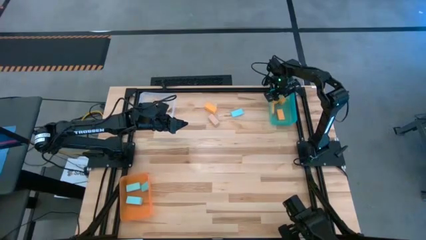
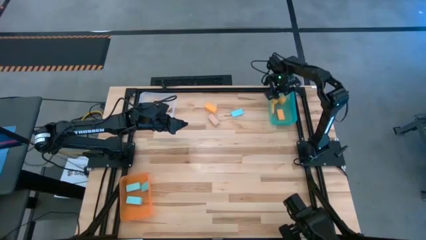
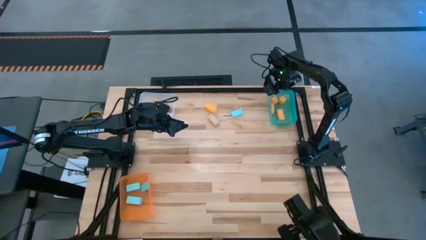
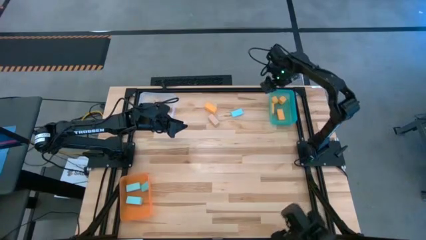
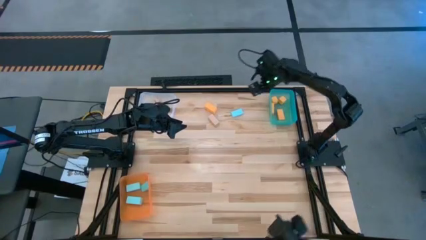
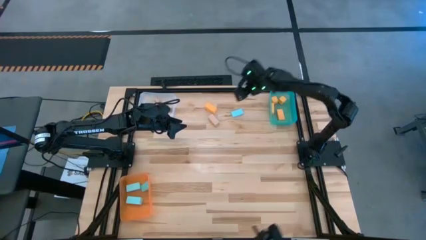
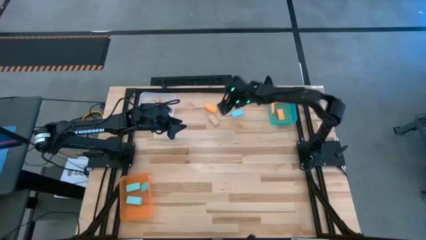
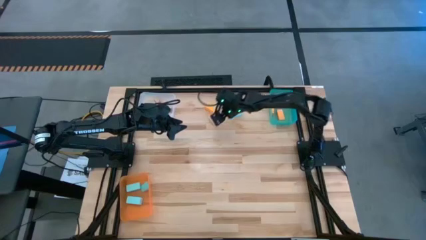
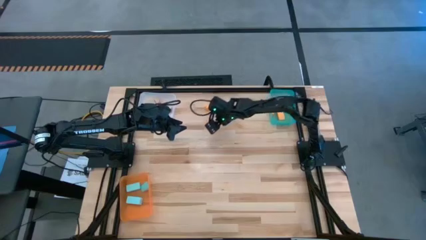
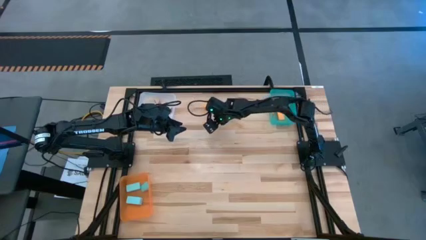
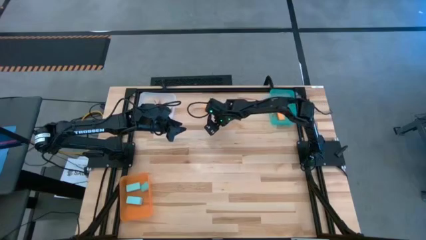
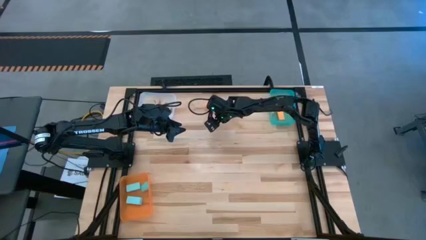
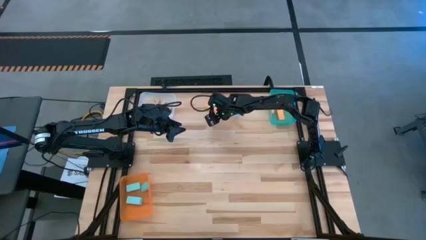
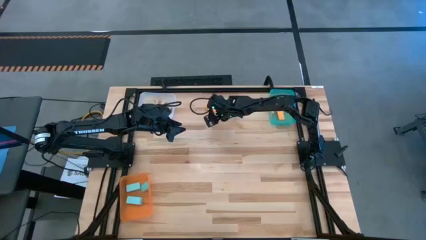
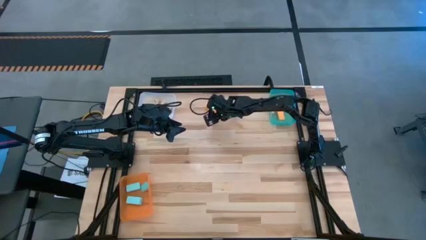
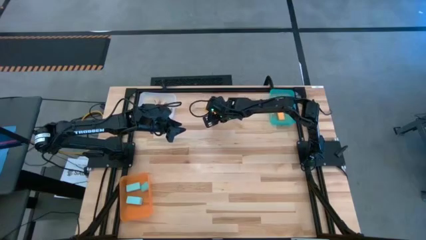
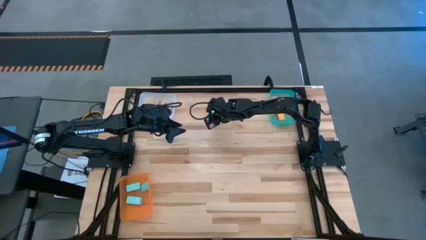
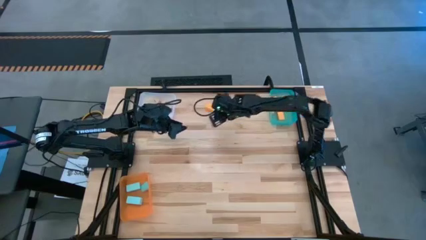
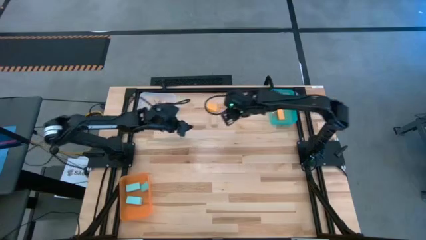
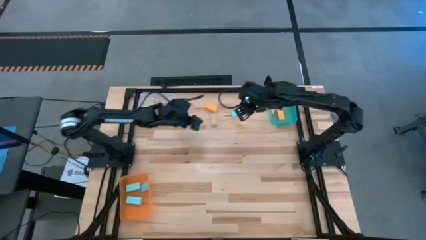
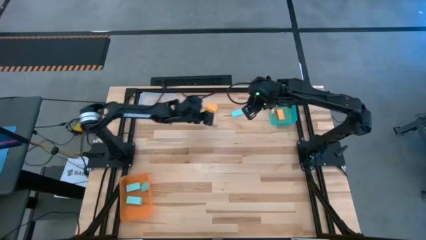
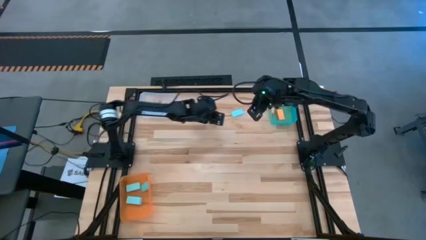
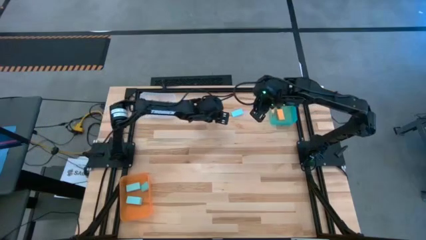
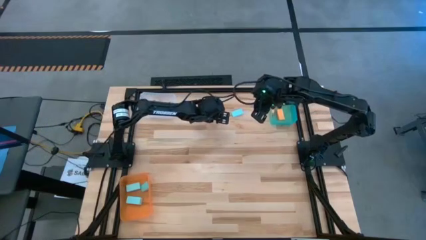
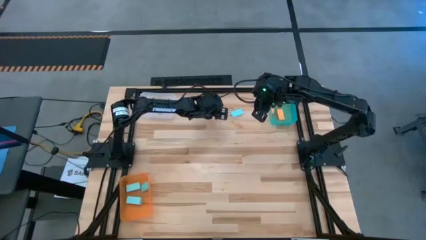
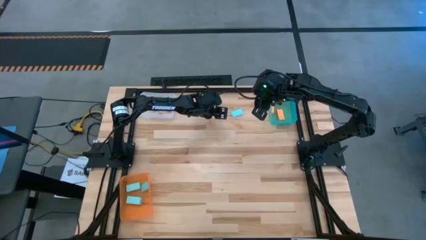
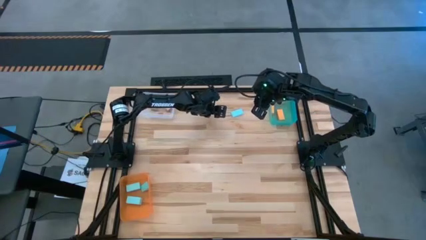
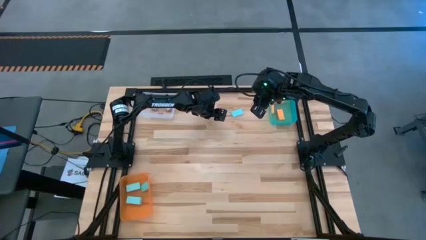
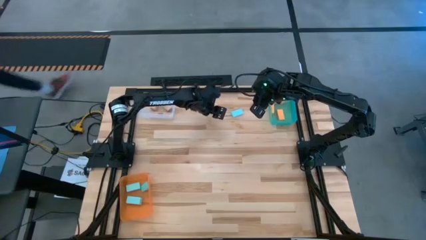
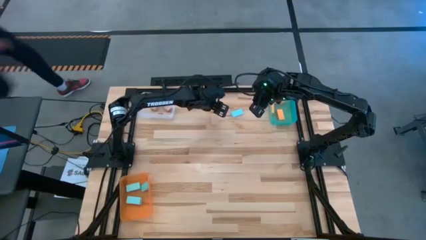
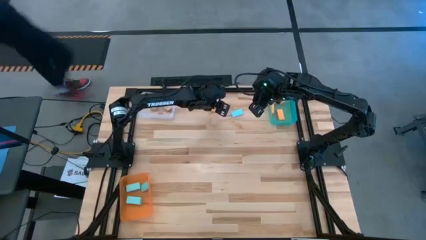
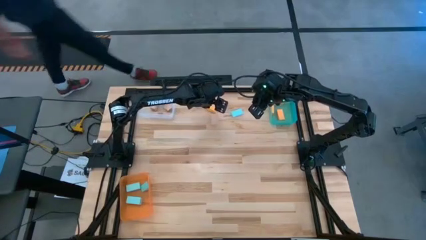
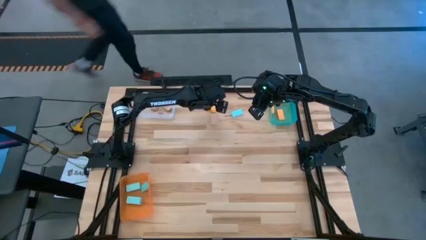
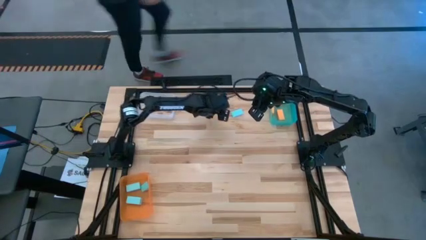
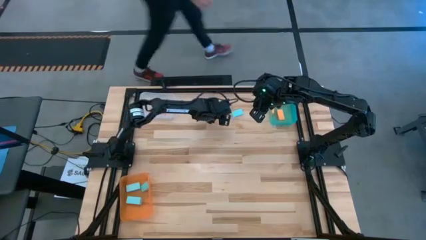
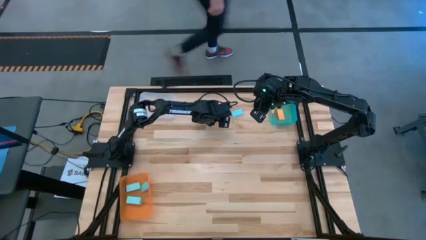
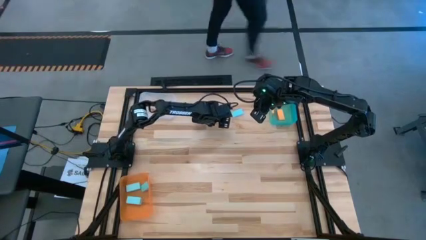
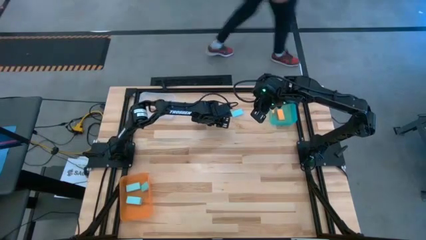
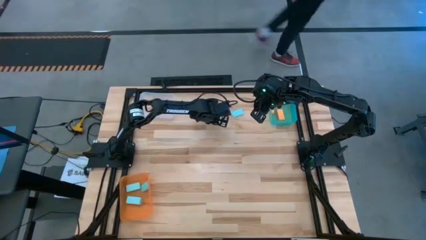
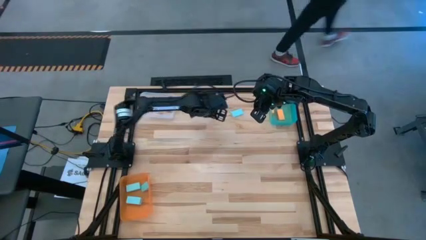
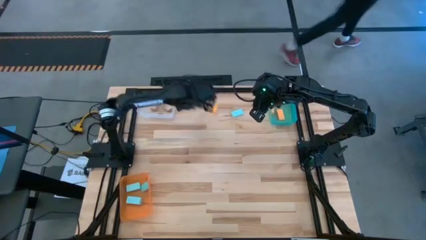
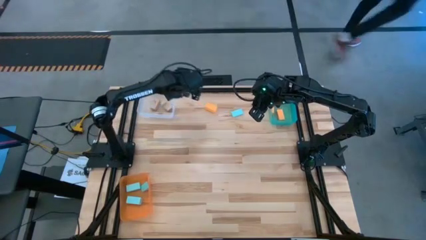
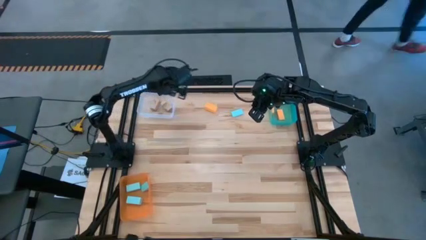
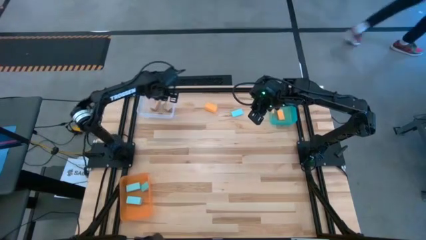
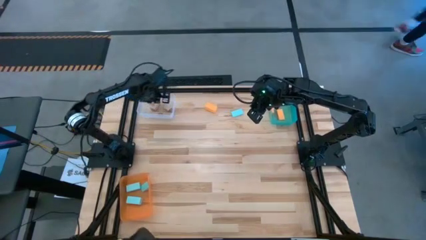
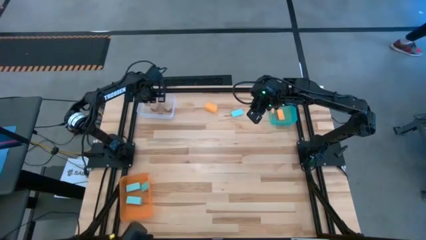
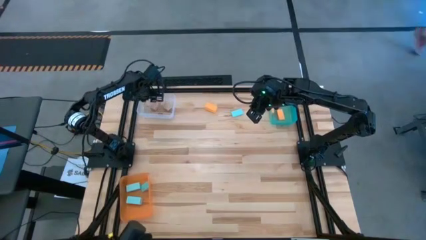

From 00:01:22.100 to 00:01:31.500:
Task: Sort & place blocks by color
Put the brown block into the transparent bin

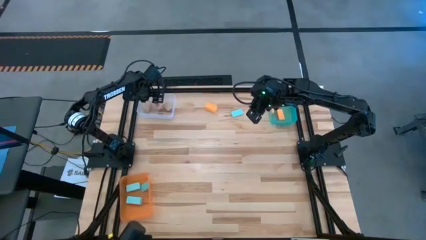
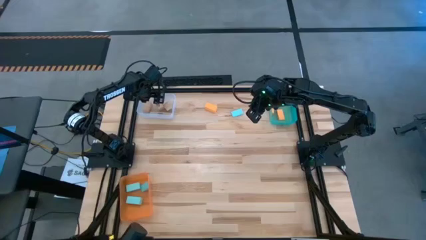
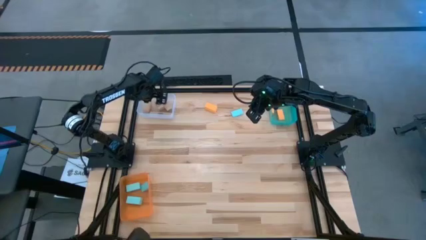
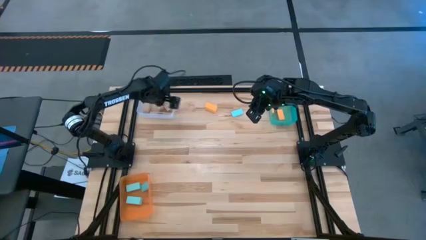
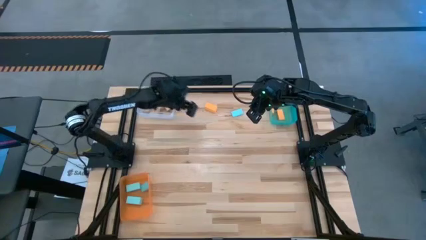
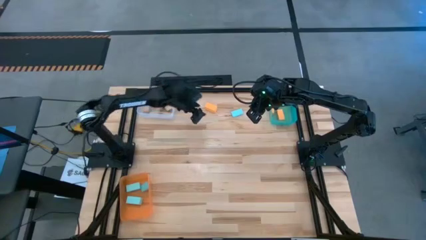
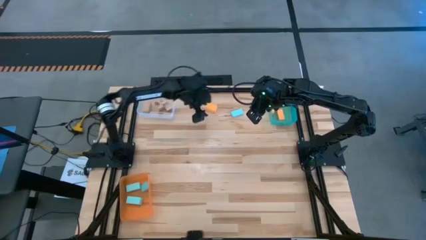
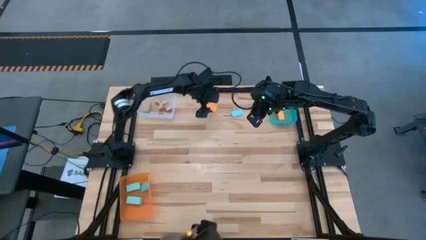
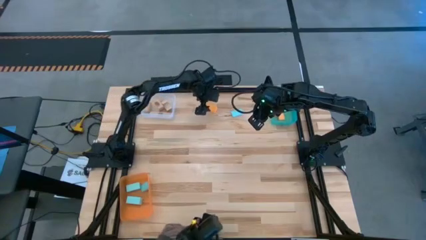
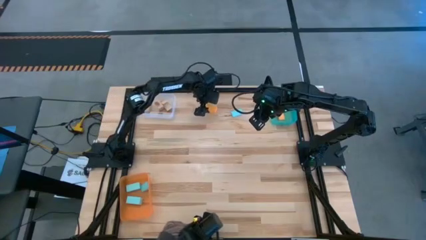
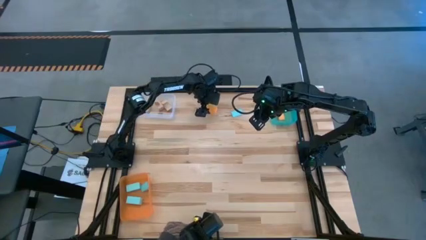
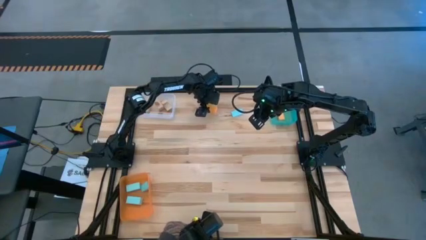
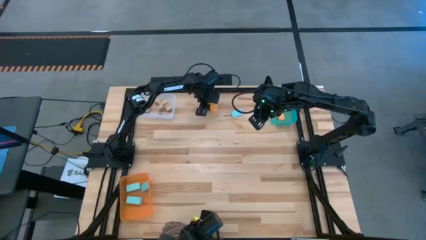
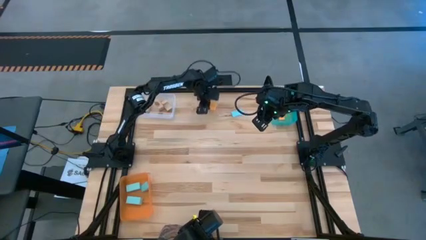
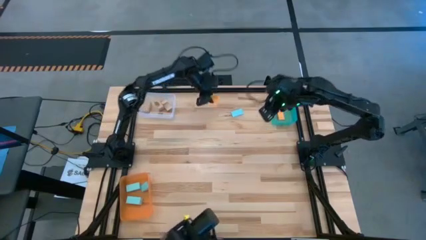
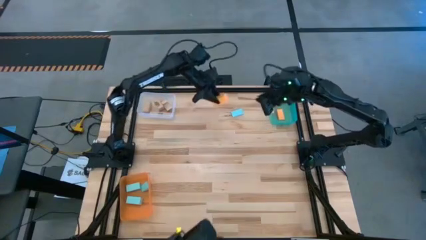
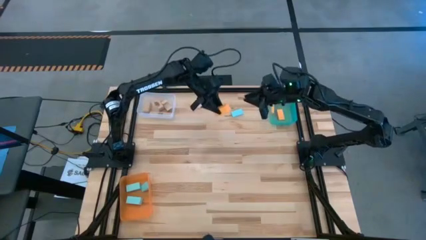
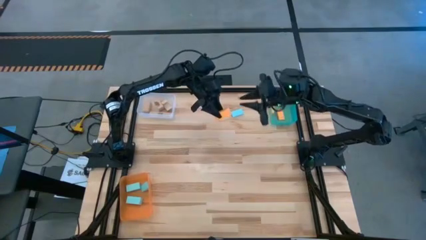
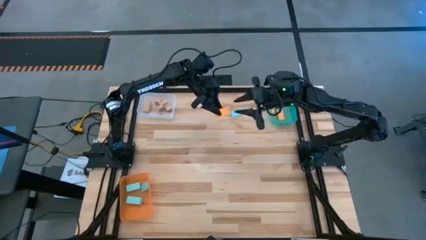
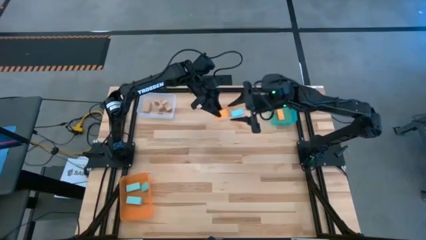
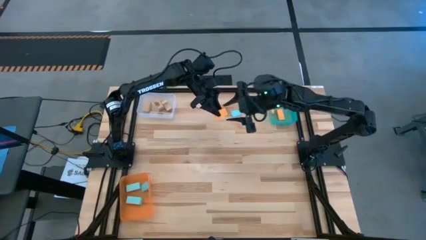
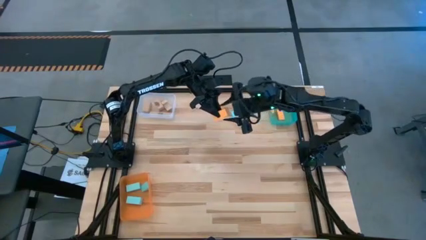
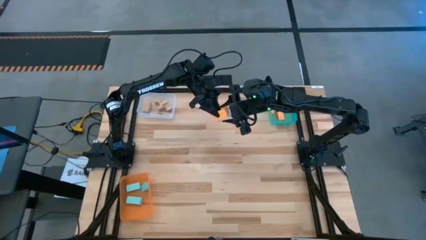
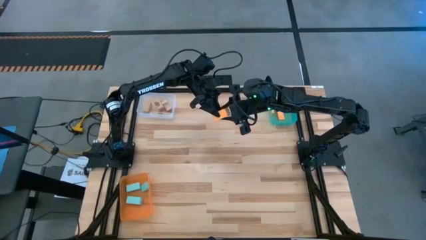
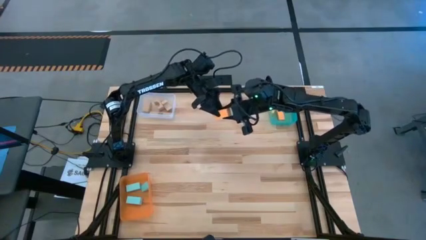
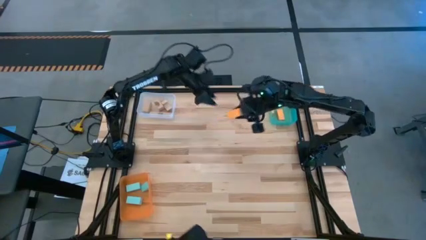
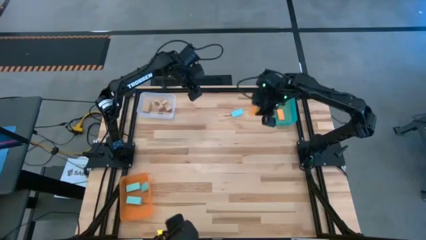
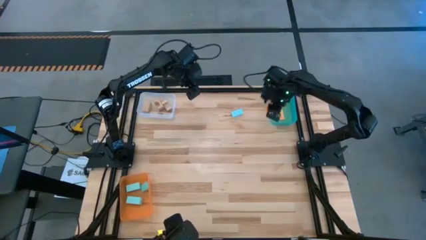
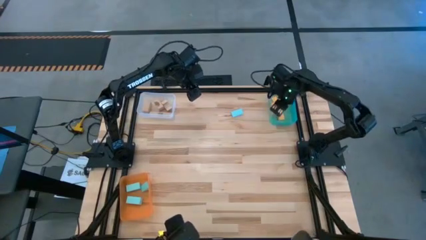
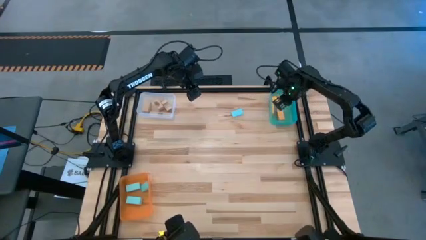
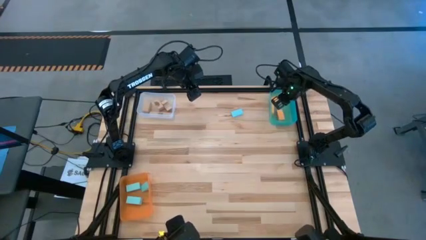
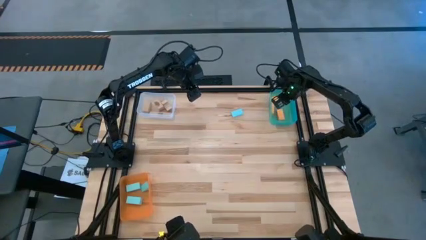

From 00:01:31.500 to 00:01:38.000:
Put the orange block into the light blue bin

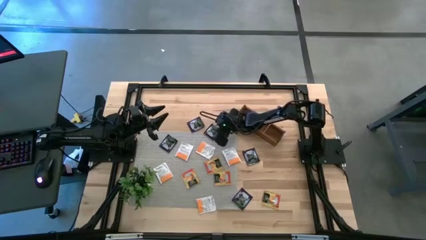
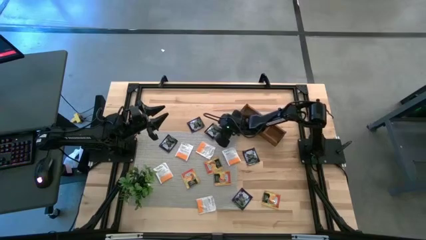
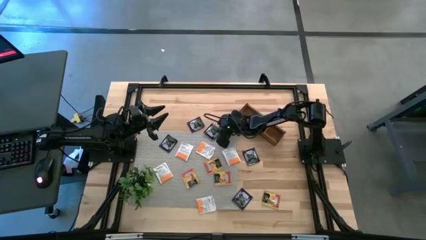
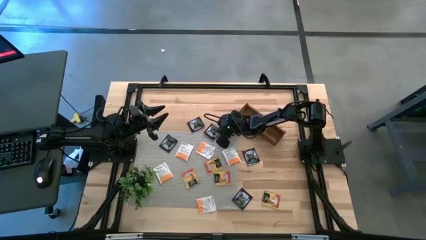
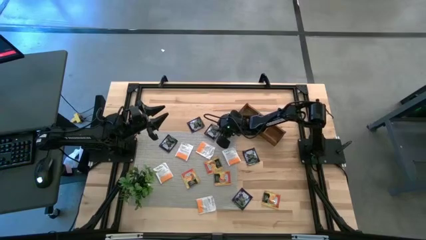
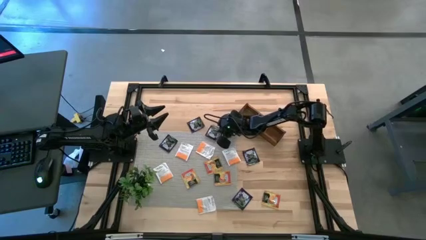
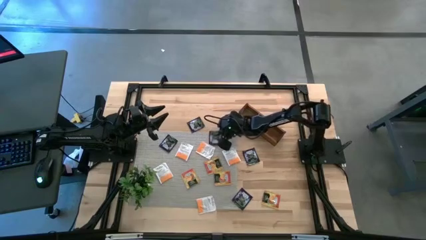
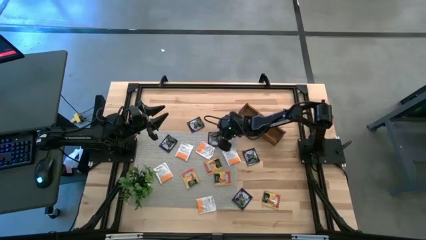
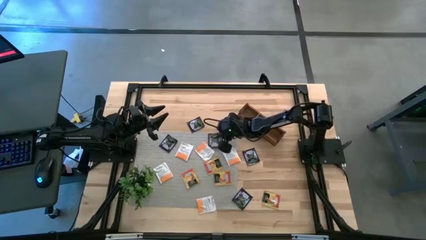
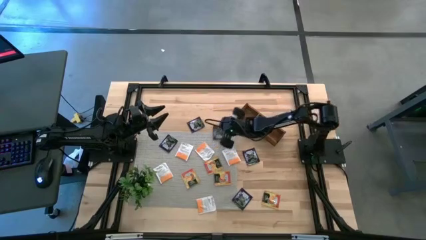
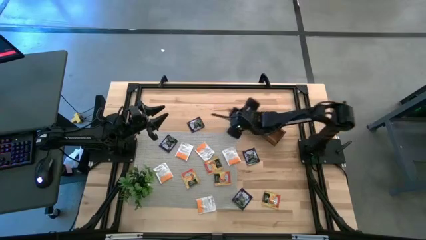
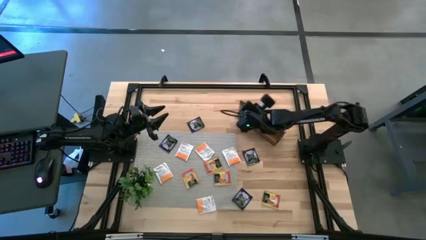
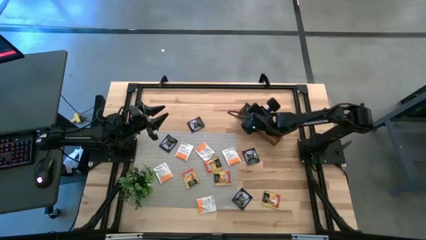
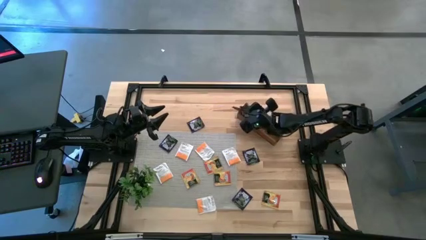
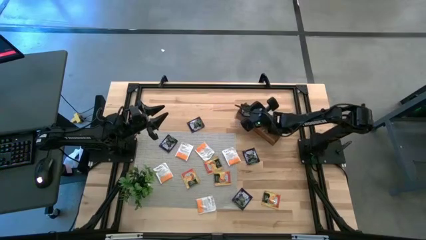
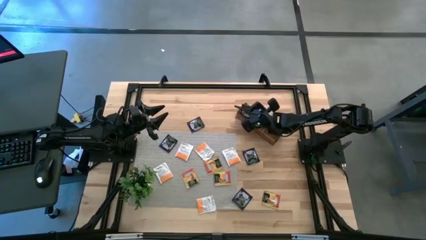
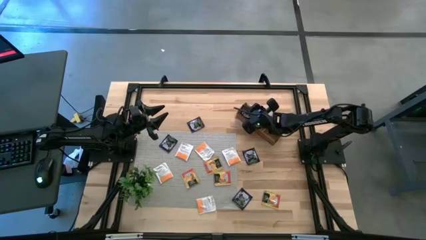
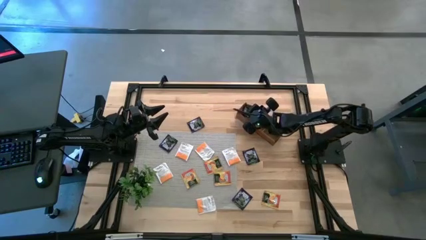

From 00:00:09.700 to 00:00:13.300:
Task: Pick & Place Tea
Put the black tea bag into the left section of the wooden organizer
